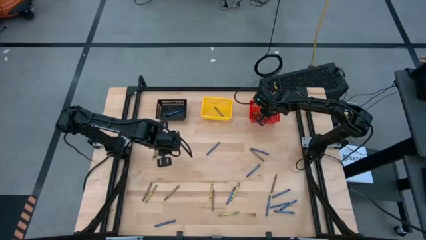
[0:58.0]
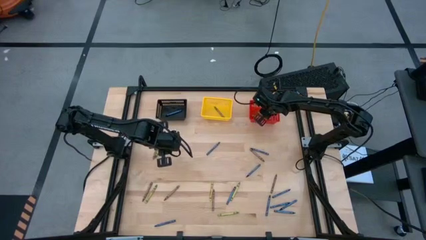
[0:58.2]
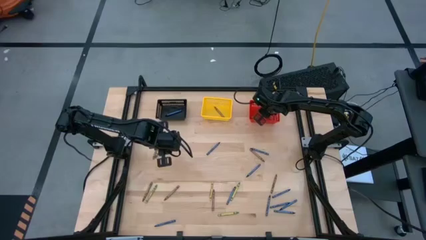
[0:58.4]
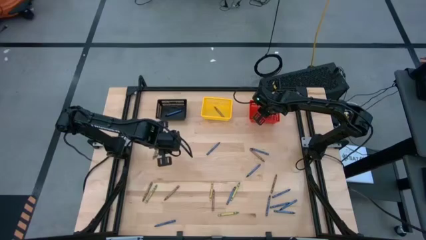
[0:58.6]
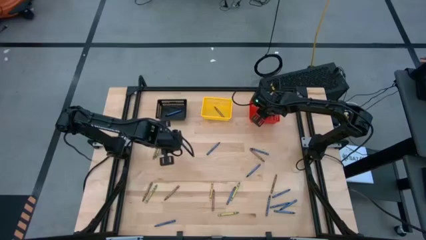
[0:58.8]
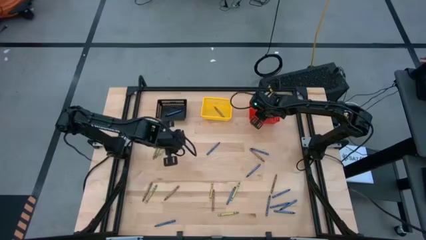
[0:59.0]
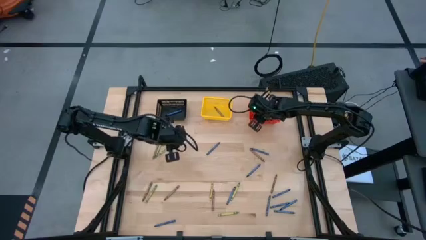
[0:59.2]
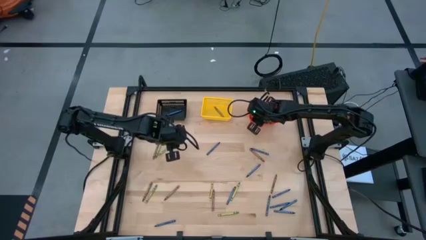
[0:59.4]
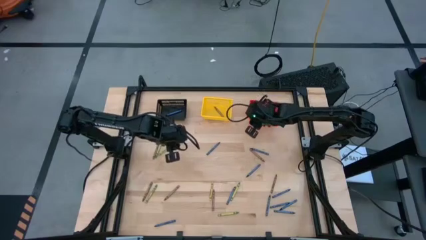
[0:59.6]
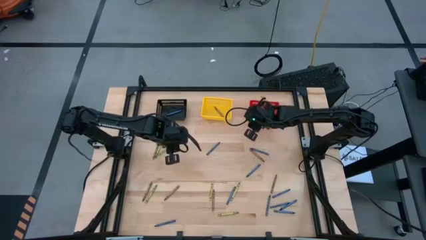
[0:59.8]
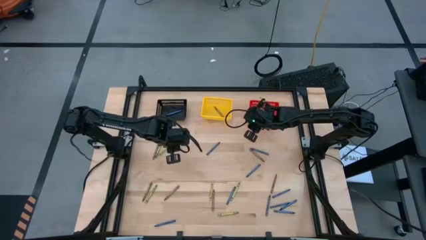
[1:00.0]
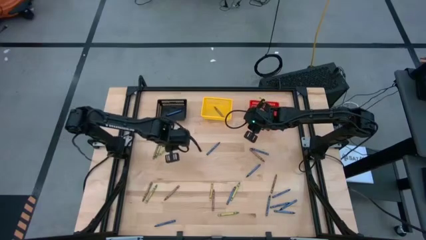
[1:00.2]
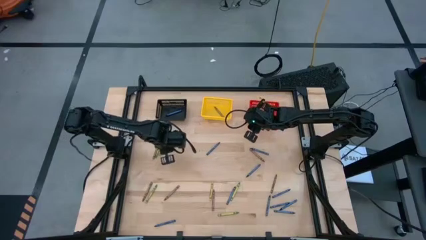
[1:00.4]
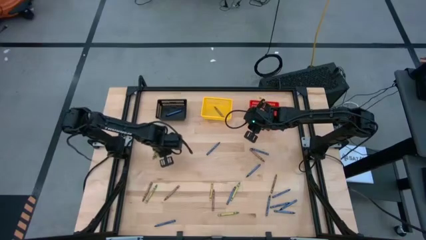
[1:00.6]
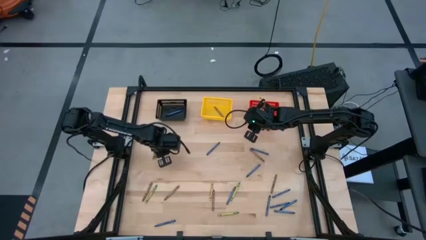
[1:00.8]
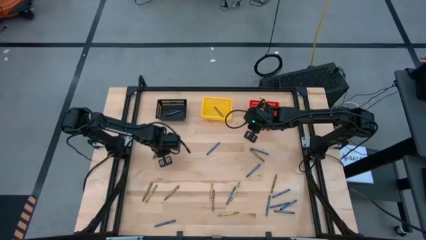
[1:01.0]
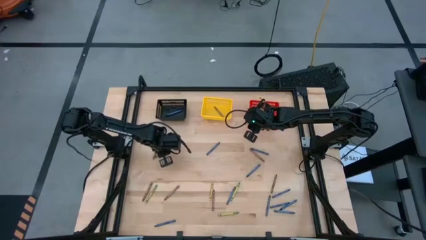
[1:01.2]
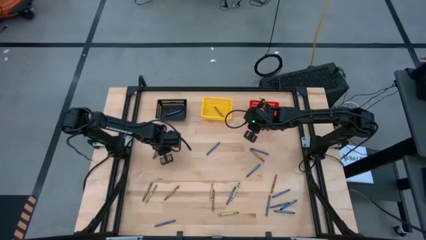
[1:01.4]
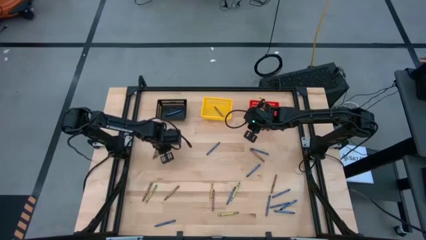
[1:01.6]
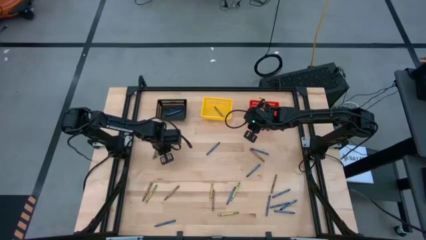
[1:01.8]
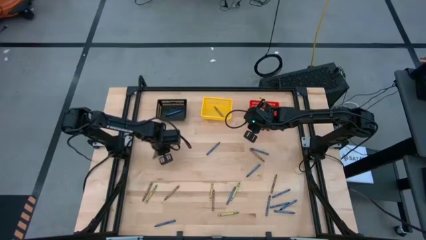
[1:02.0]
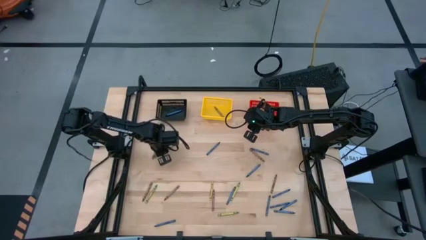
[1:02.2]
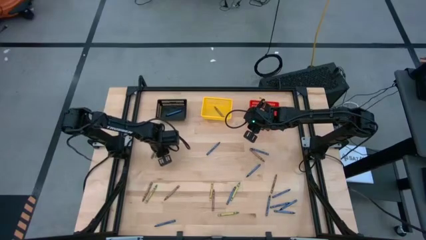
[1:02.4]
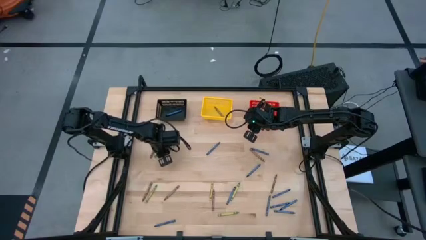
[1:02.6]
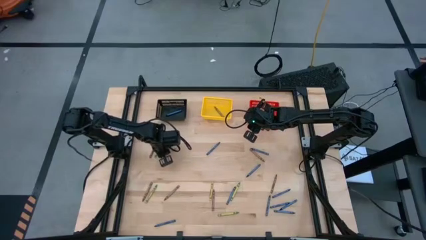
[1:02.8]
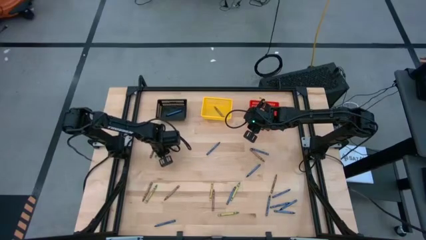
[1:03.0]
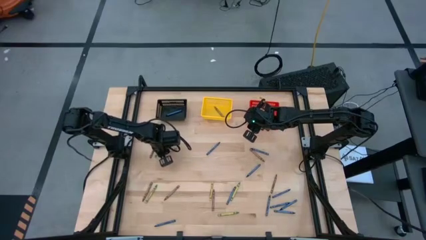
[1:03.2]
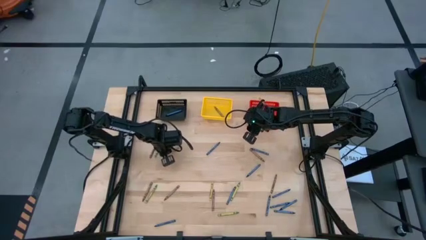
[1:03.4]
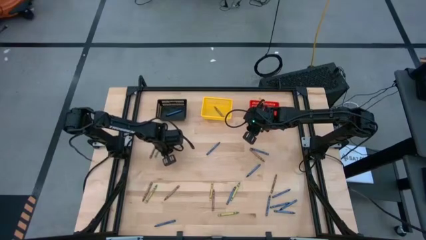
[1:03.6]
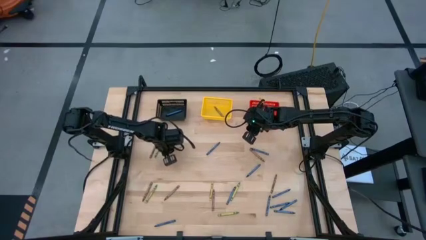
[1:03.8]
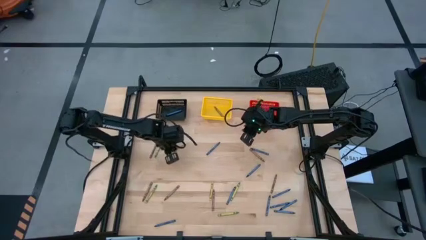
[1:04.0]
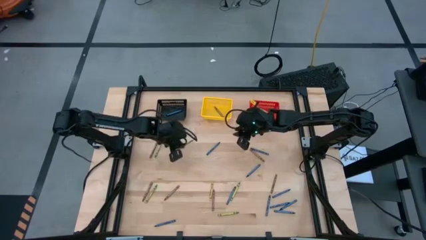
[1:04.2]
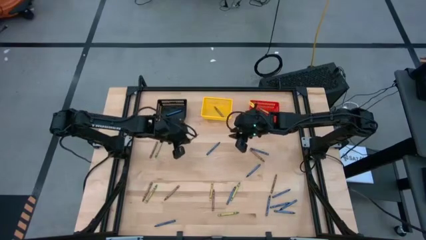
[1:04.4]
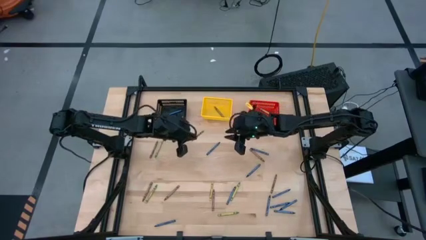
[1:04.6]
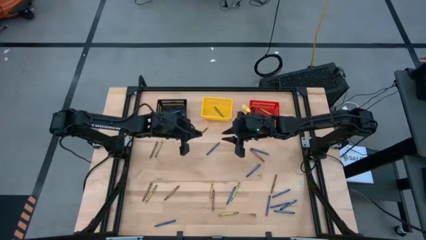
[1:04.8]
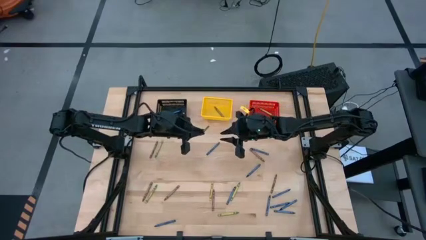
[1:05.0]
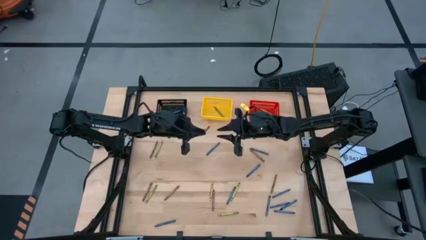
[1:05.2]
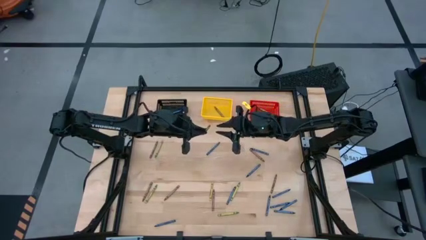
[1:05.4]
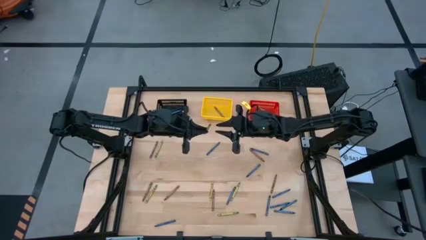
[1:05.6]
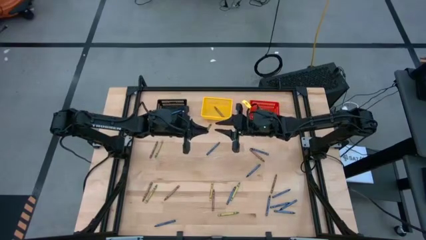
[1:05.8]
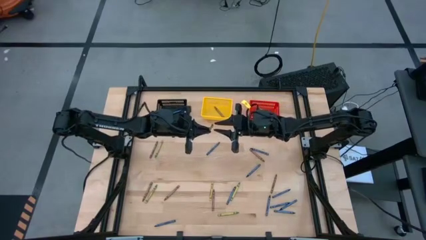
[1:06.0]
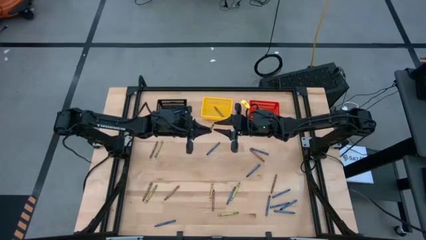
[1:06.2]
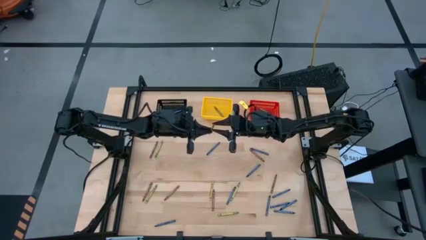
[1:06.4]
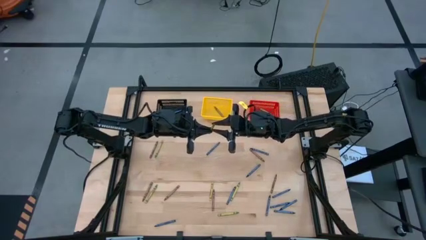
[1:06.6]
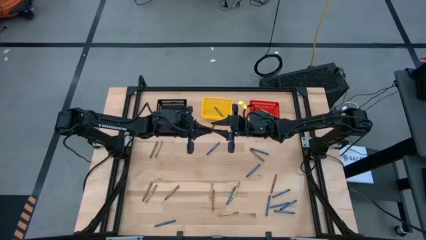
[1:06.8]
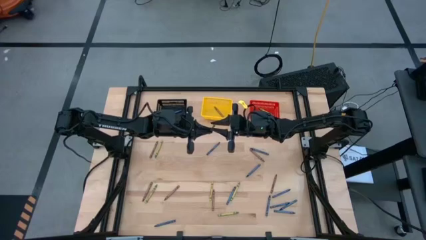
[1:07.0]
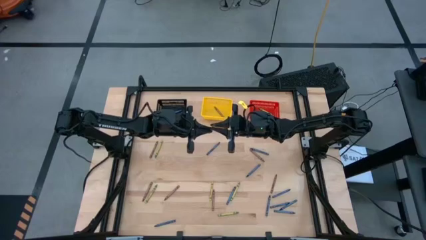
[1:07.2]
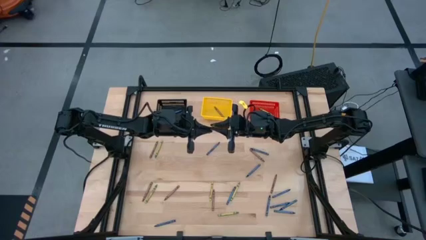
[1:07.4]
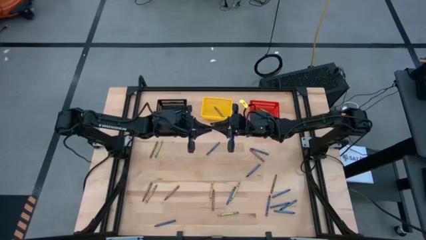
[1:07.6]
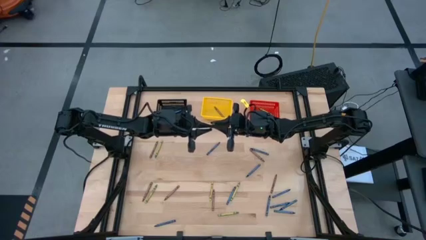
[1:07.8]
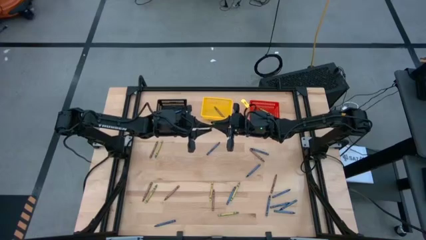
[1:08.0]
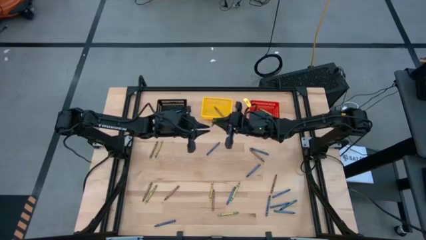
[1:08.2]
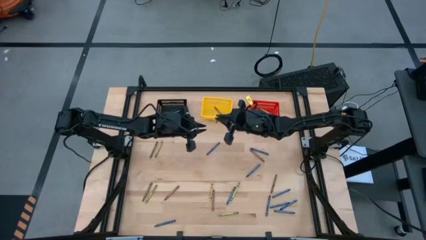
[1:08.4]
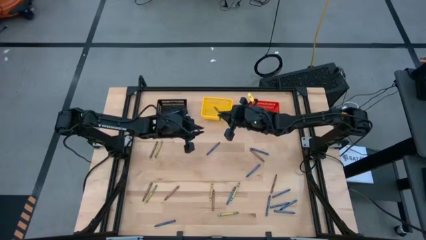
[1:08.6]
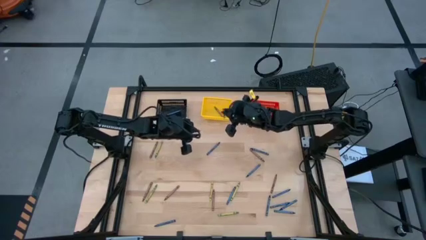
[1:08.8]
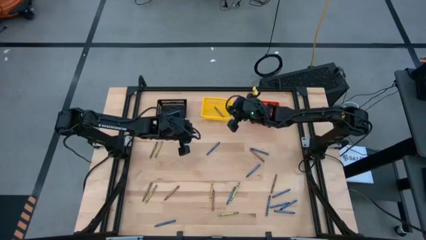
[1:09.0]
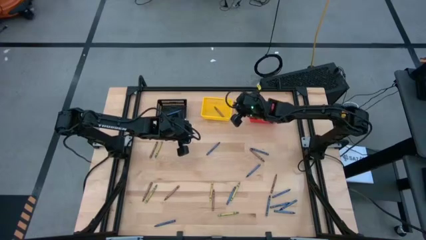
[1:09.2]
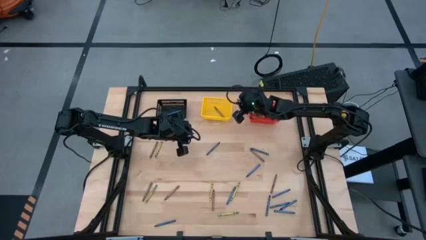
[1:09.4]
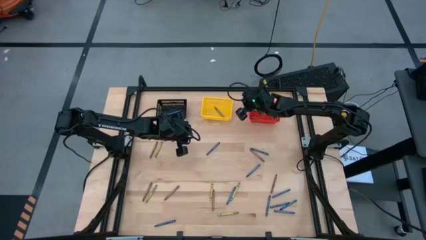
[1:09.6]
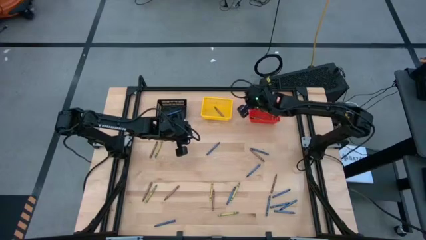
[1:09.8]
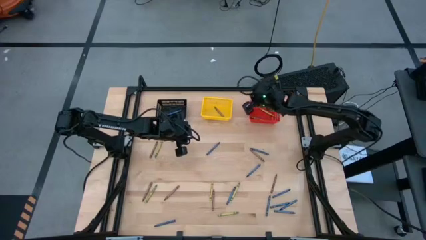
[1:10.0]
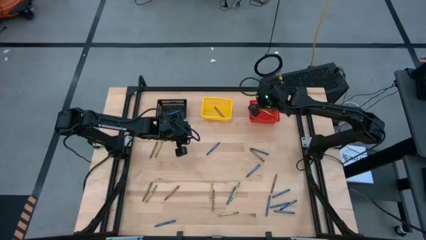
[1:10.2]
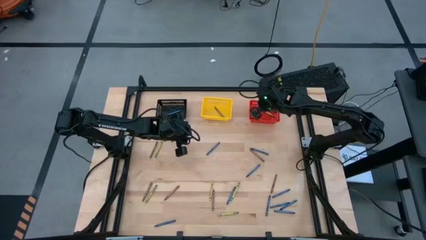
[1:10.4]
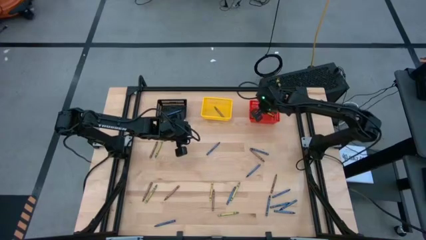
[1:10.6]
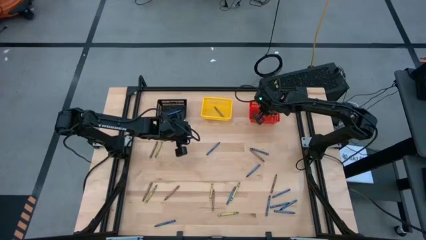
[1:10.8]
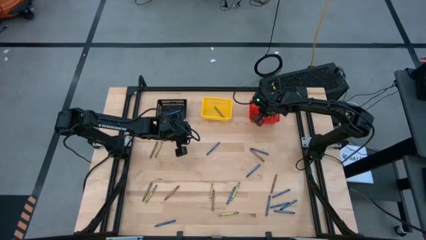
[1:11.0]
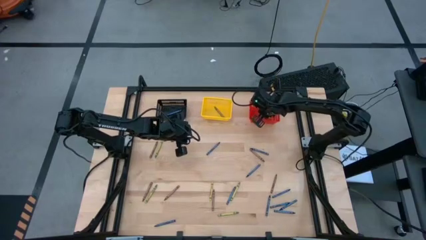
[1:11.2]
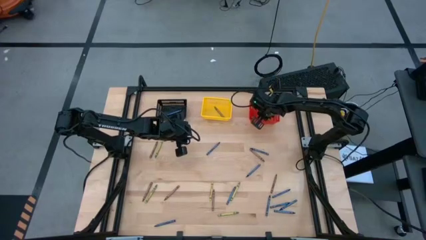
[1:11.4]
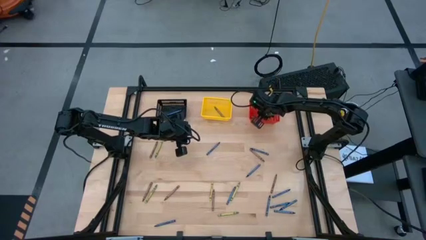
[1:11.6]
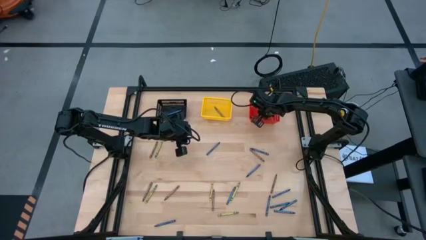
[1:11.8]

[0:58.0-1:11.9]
Task: Sort crayons
Put the green crayon into the red bin
